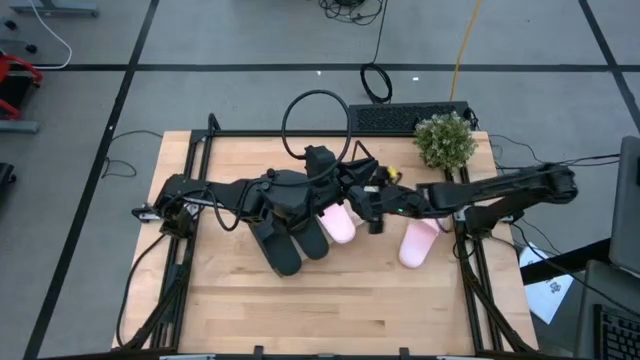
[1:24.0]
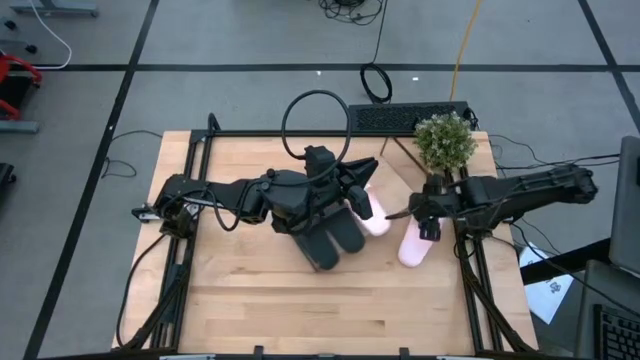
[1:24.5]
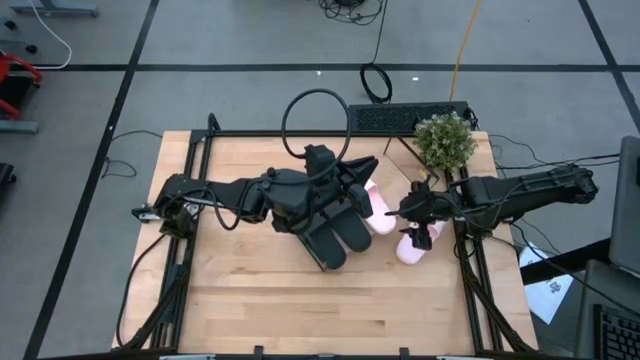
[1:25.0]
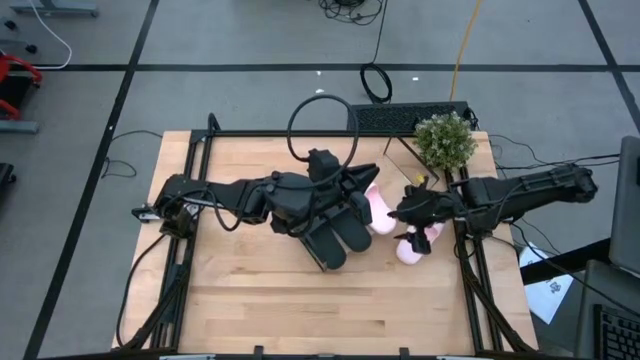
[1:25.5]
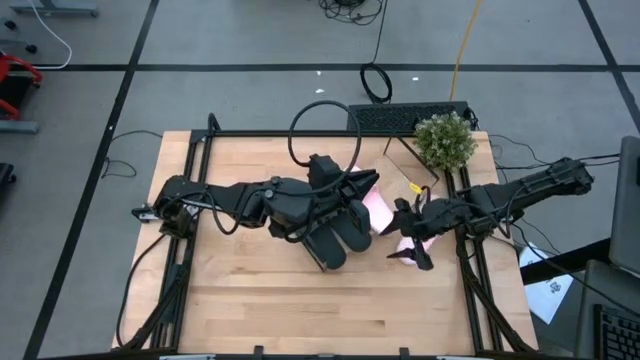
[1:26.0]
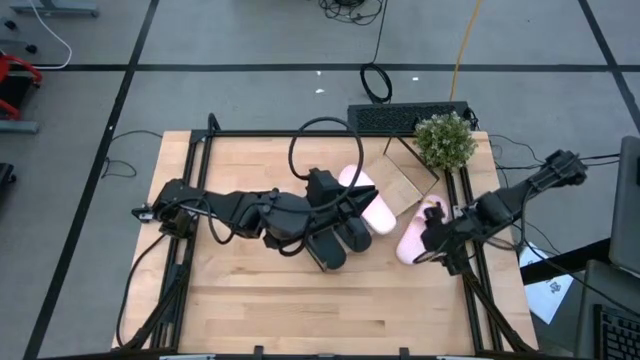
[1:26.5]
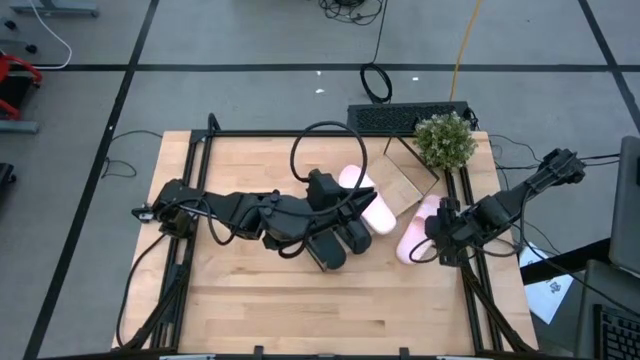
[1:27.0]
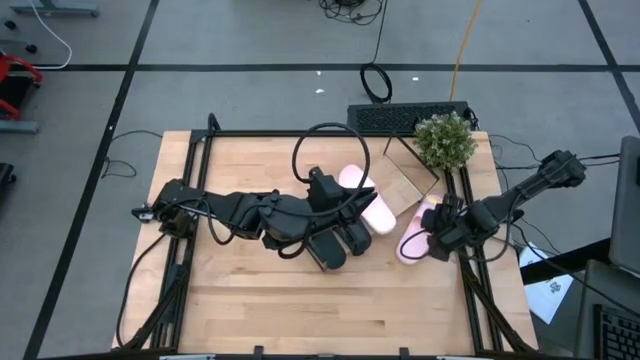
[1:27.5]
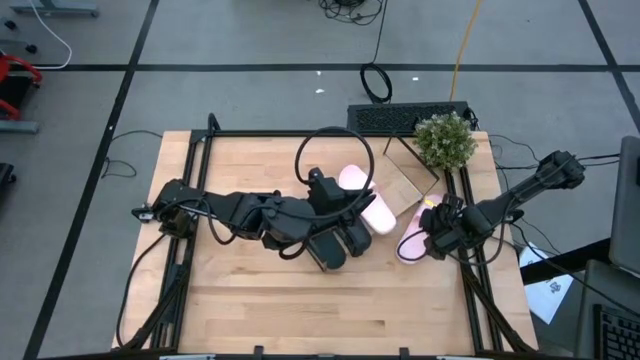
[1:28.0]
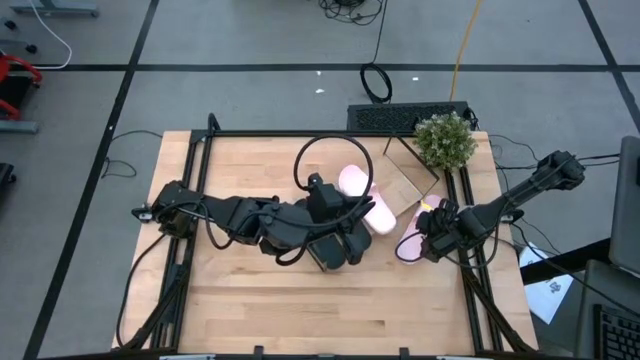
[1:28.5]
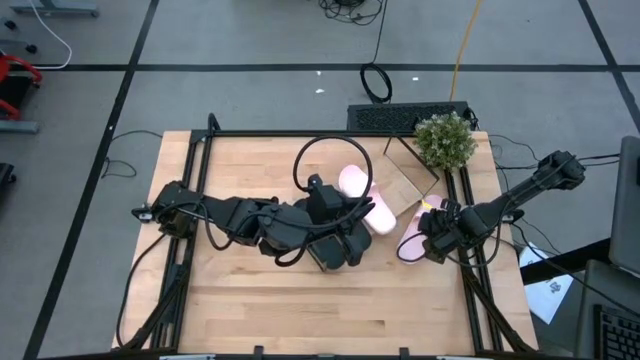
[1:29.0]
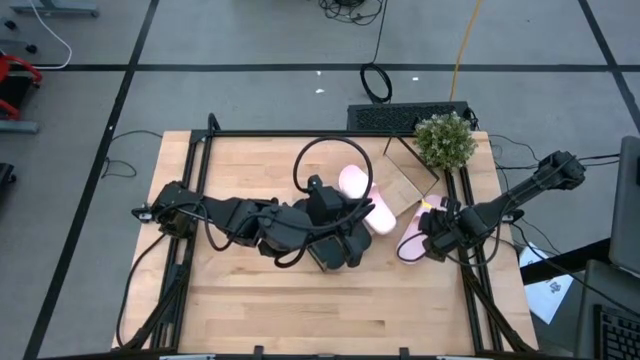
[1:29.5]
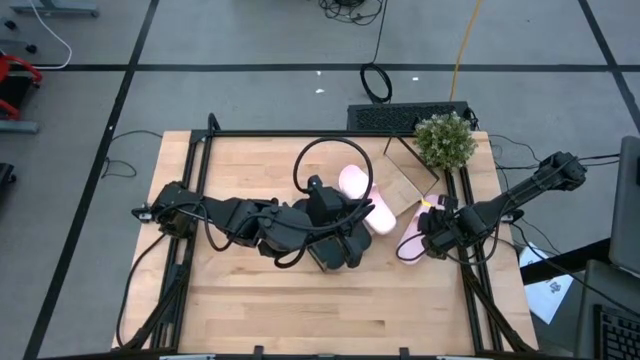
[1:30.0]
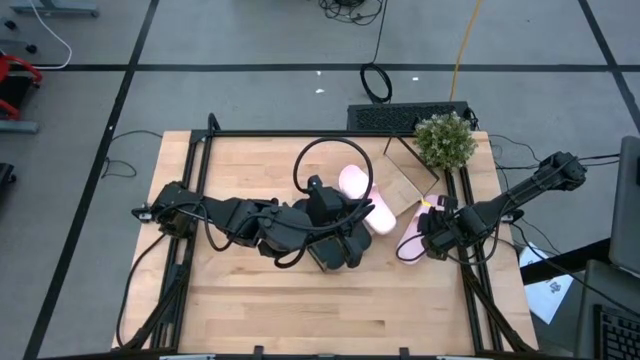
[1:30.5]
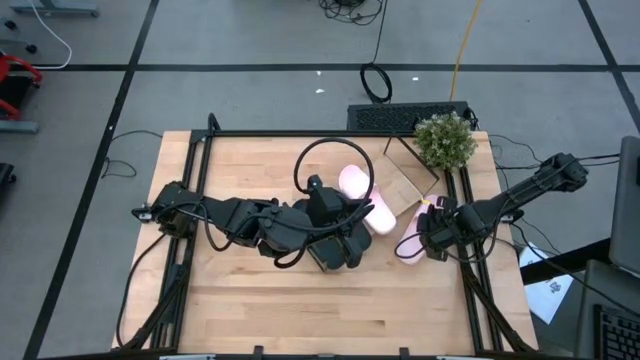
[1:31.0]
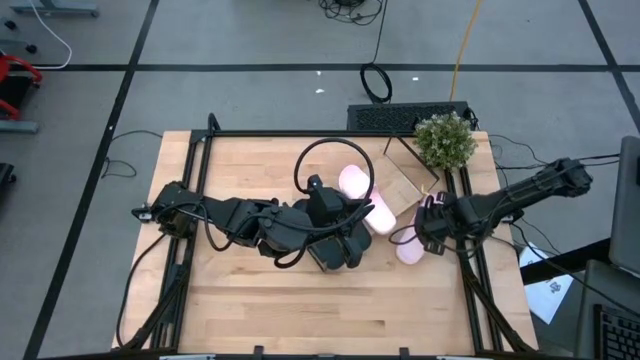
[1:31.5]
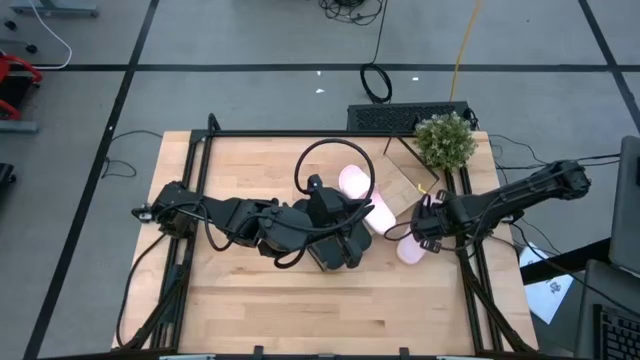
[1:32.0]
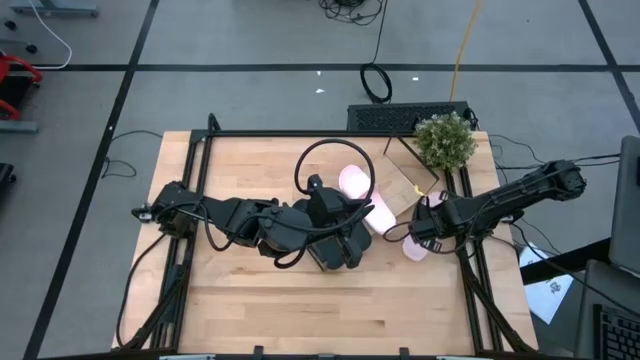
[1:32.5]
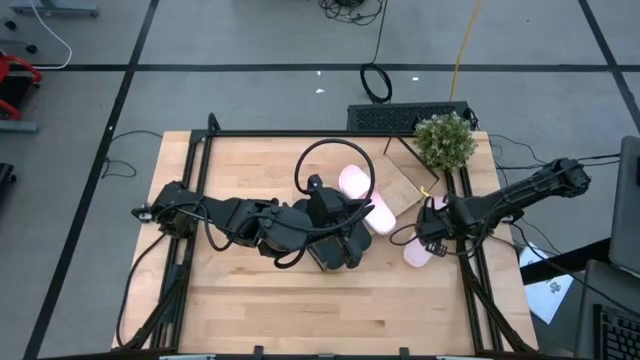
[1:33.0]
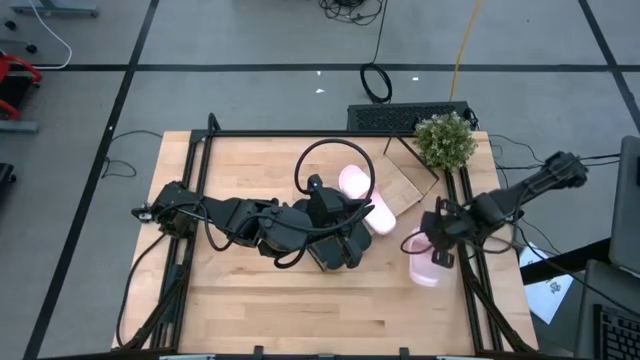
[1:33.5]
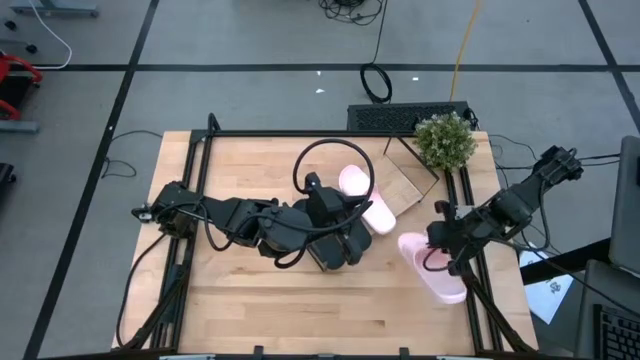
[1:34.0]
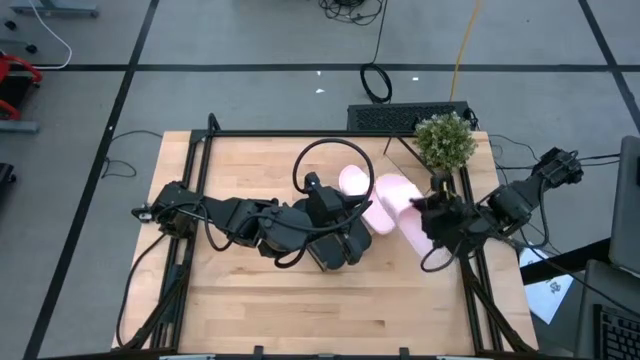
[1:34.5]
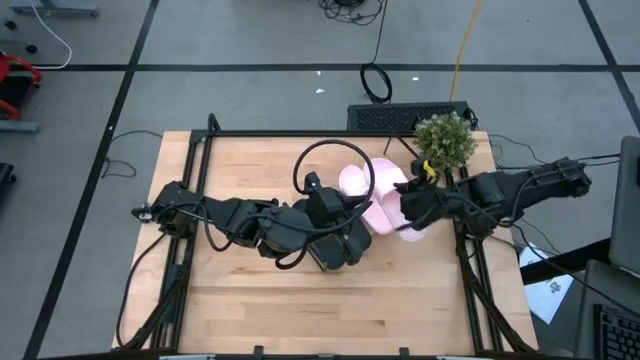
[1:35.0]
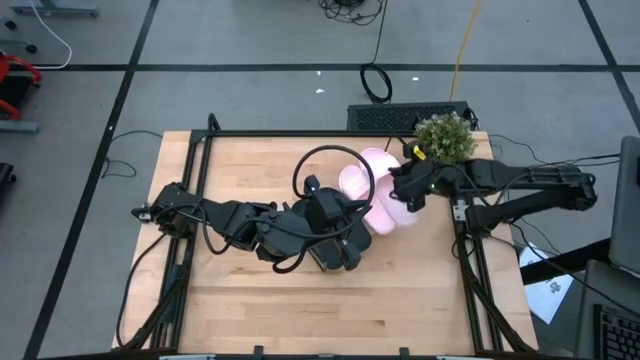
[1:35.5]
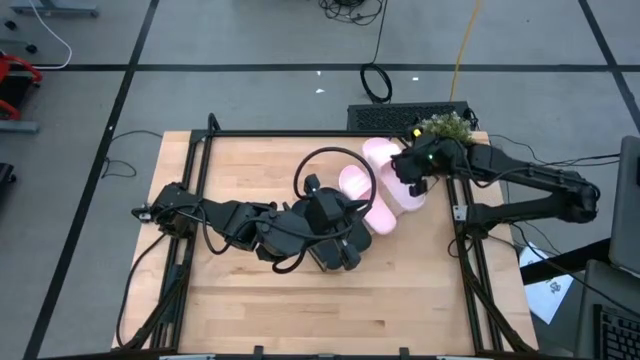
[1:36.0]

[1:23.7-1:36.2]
Task: Pick and place slides into the shelf
Put the pink slipper on the shelf

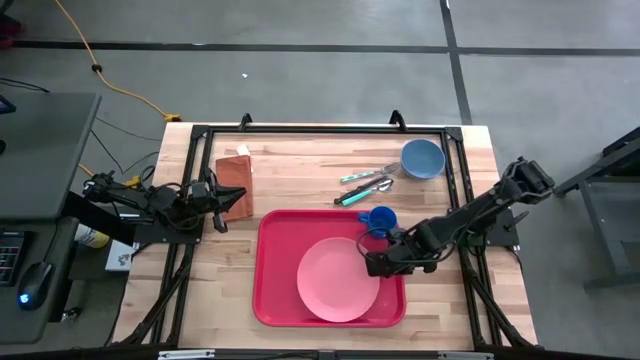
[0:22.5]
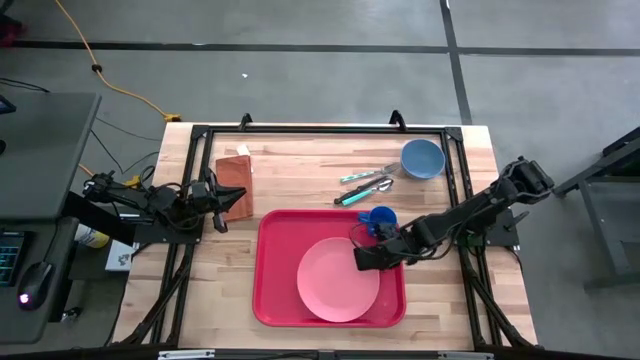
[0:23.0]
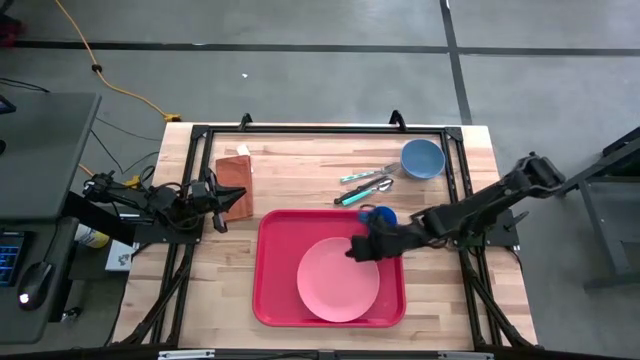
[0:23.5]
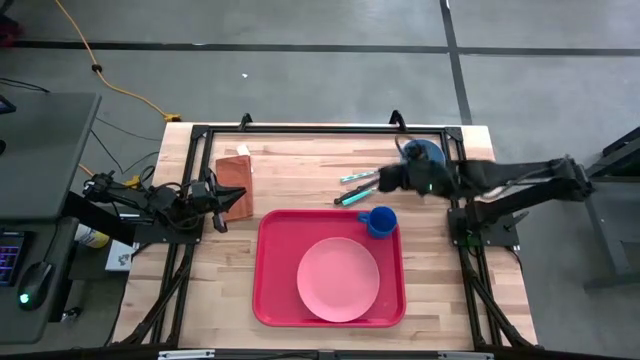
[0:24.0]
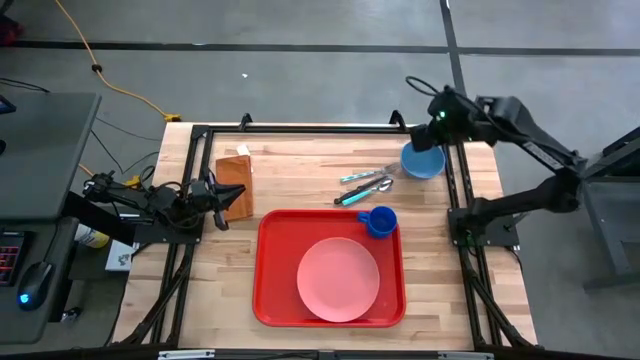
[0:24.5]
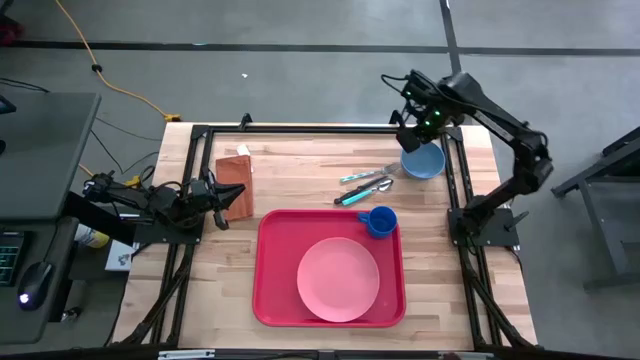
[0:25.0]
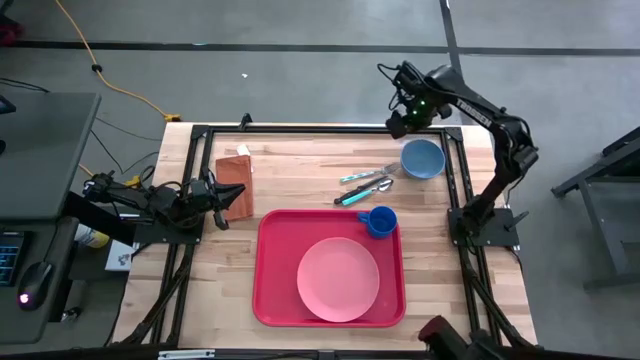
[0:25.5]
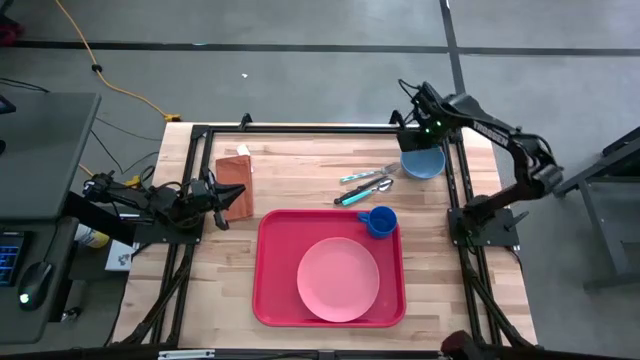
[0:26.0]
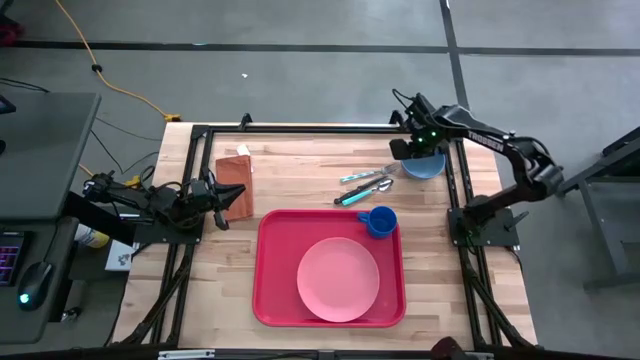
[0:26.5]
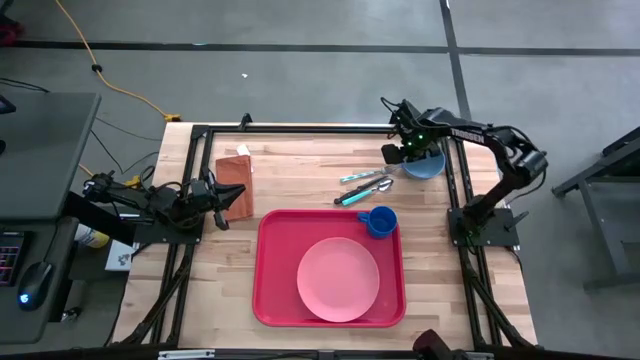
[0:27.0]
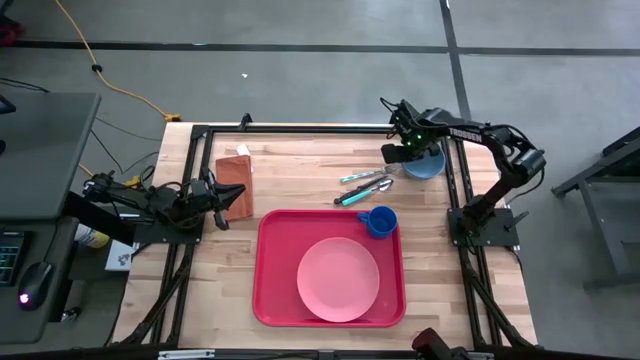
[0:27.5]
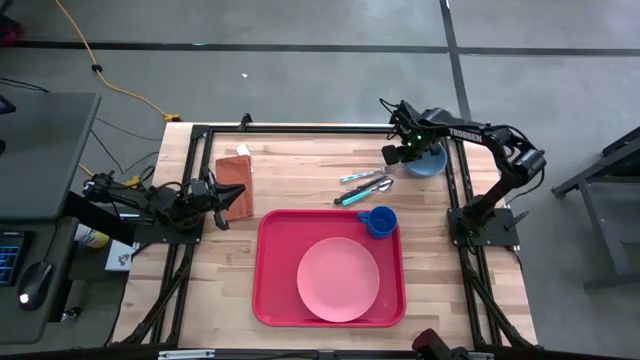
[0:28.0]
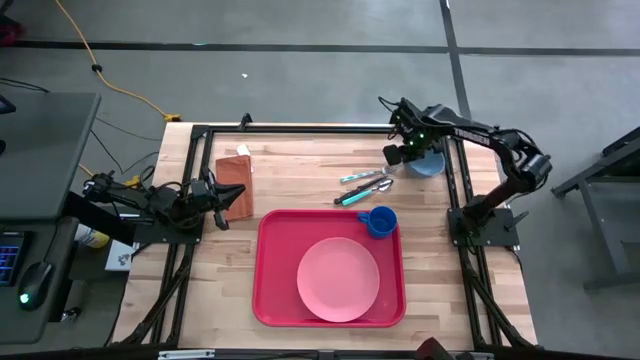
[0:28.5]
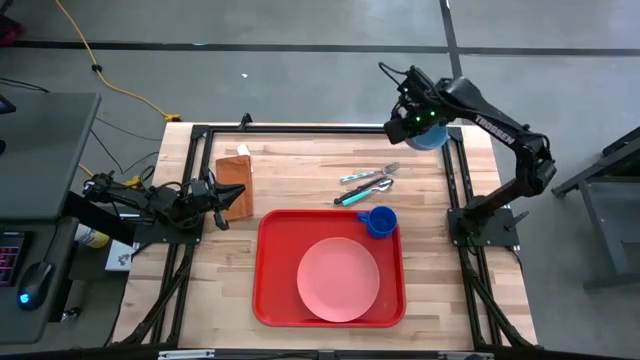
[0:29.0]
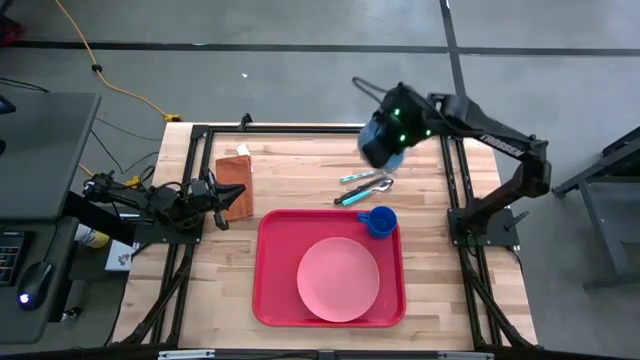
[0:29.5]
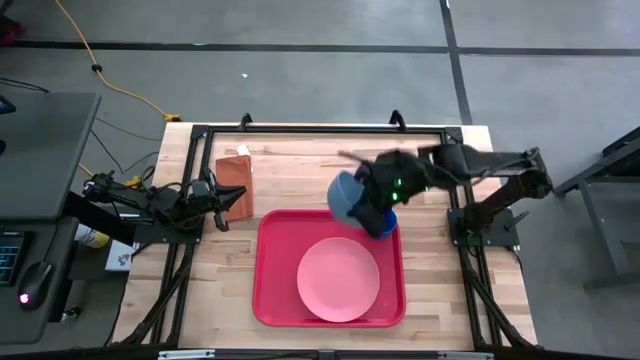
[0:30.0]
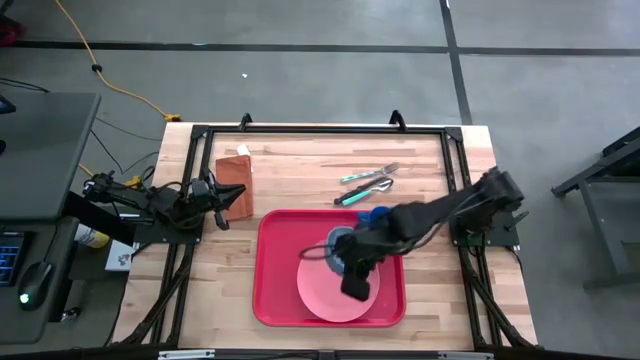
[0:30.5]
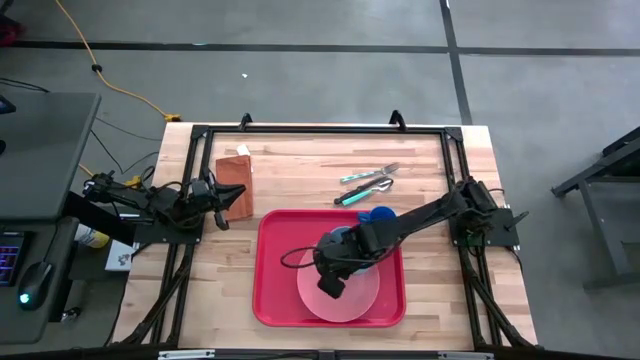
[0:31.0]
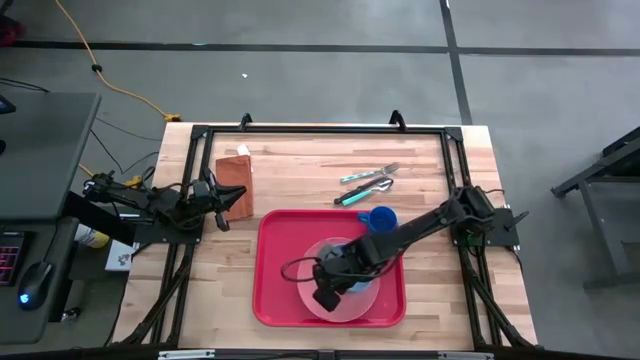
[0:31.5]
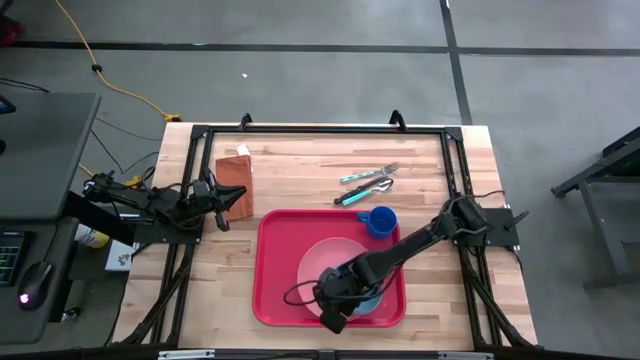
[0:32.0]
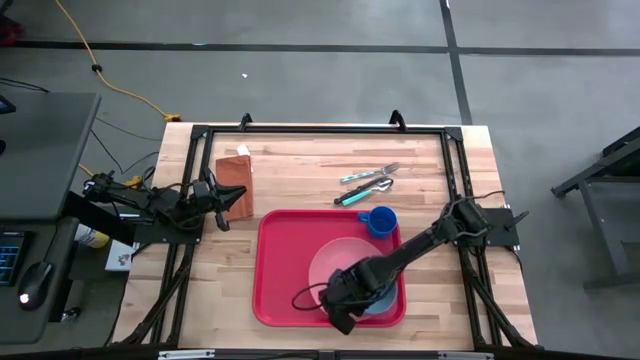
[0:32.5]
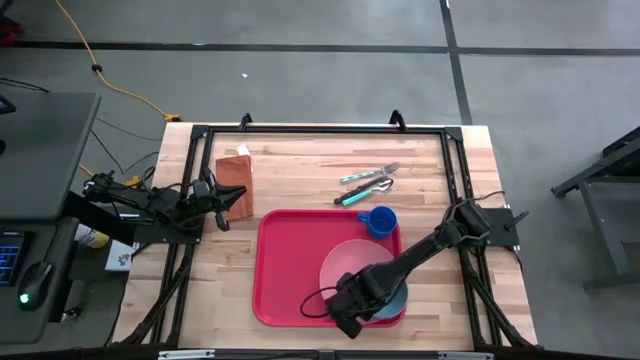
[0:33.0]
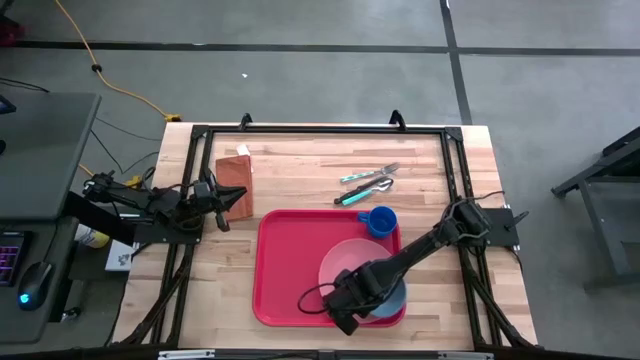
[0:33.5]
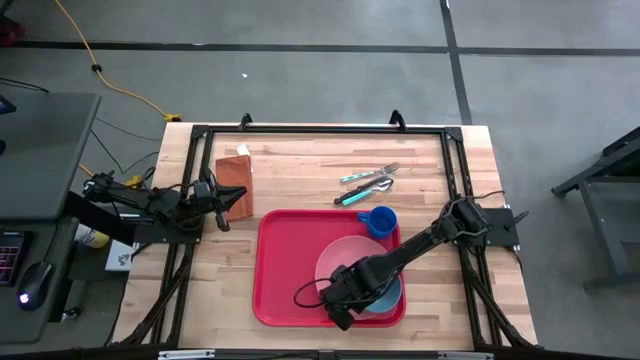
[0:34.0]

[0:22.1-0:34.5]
Task: Set up tray
Put the blue bowl on top of the pink plate on the serving tray
